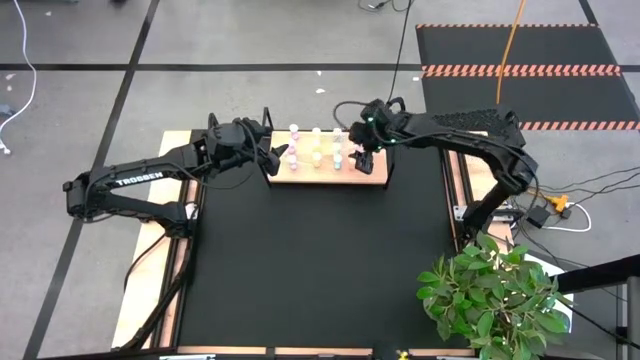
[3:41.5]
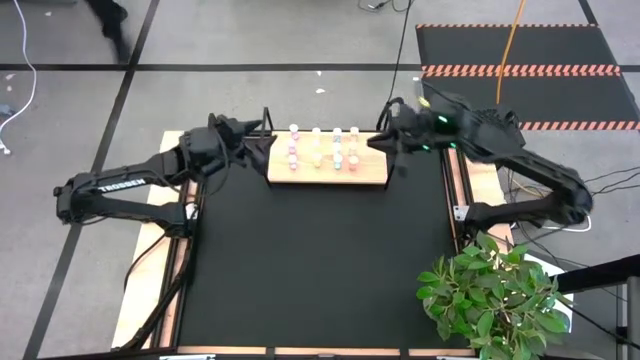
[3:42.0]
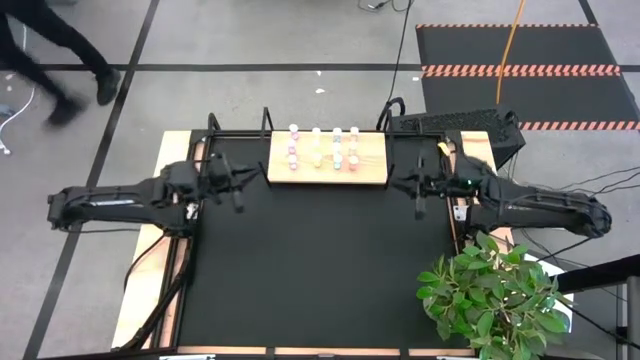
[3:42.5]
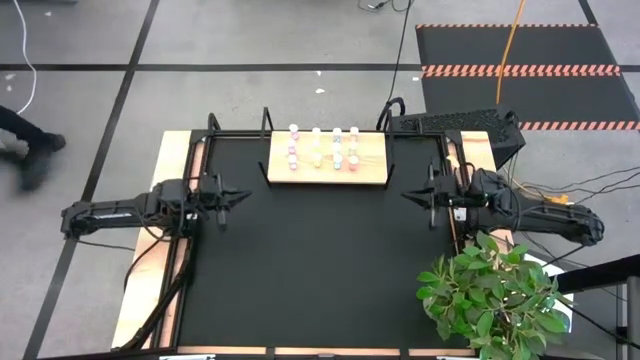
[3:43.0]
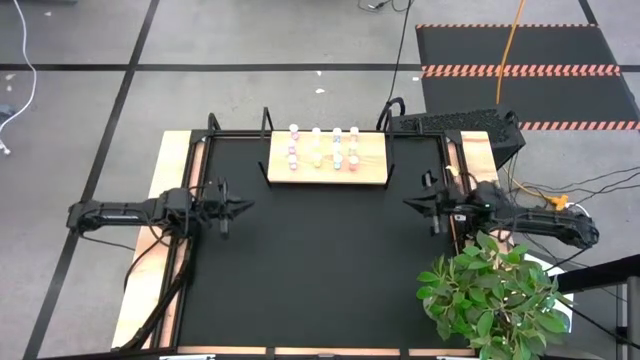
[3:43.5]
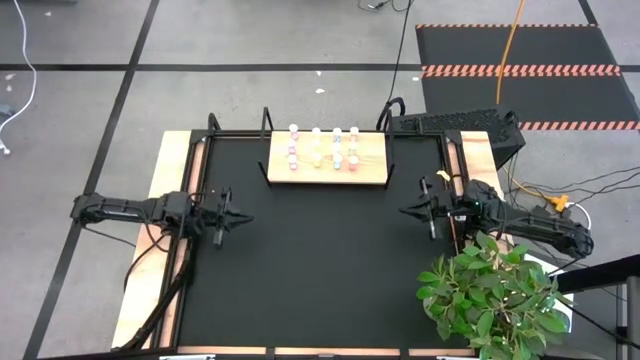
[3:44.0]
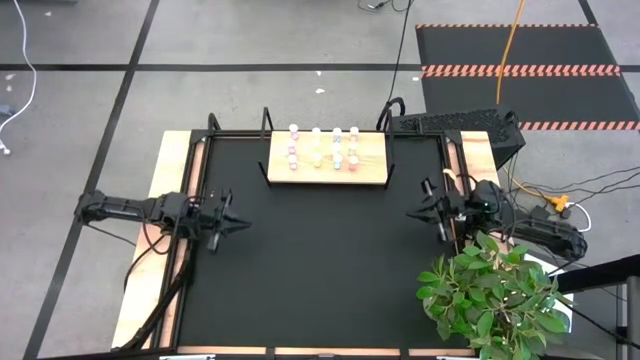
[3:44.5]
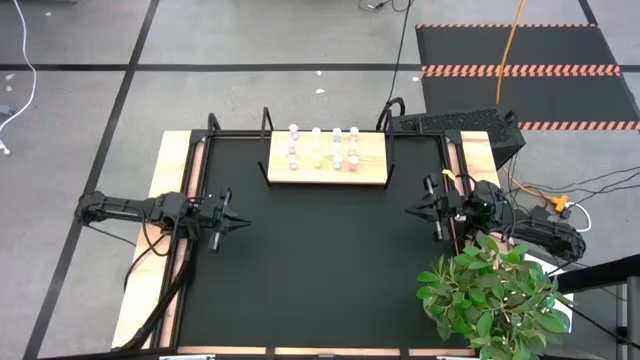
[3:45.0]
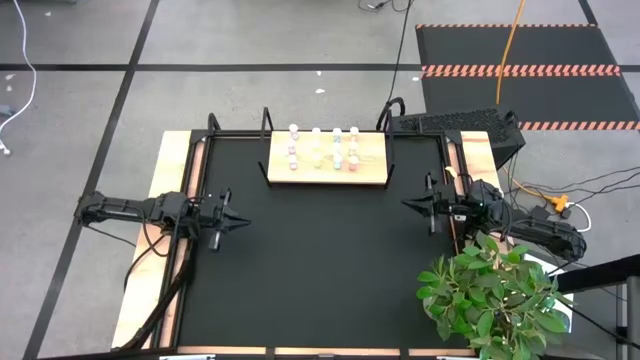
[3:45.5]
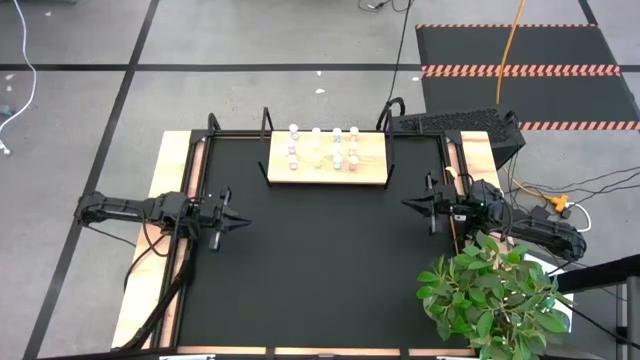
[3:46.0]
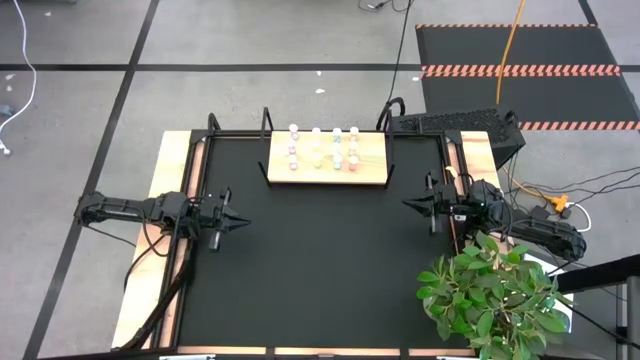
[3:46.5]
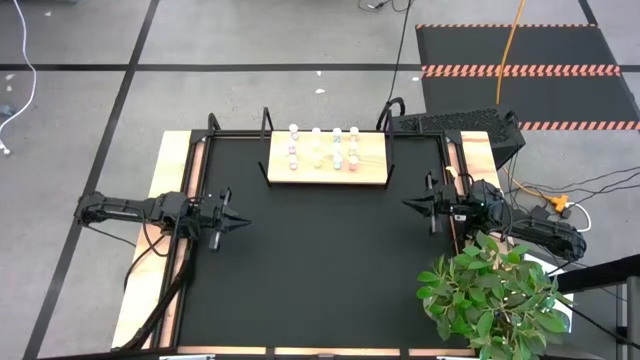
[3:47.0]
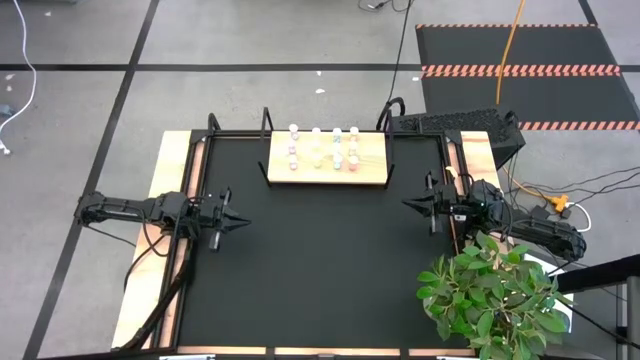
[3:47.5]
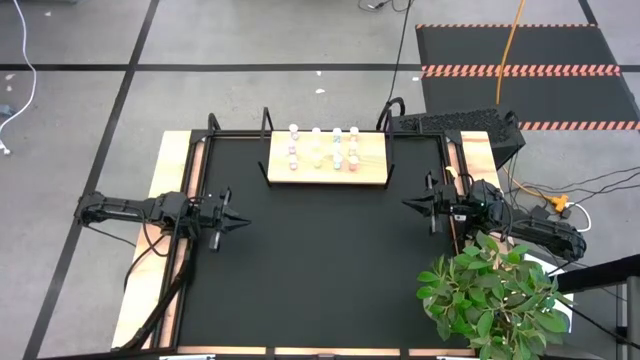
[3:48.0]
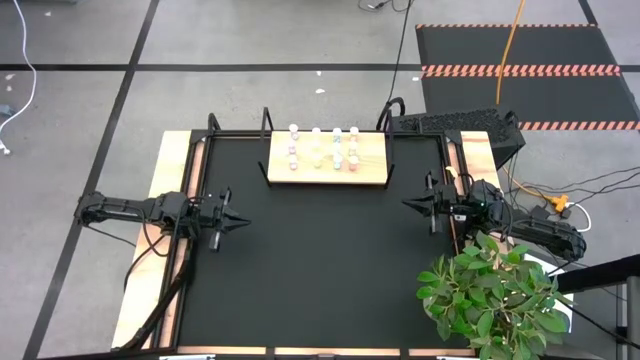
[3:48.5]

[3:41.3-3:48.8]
Task: Pick and place medicine bottles onto shelf by color
Return to Home Position

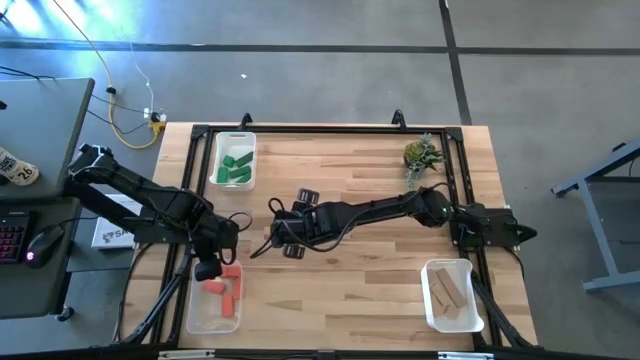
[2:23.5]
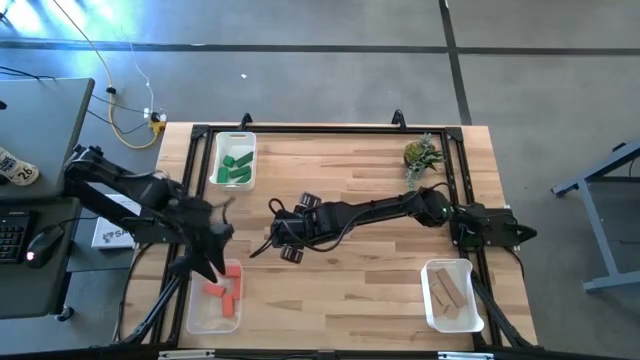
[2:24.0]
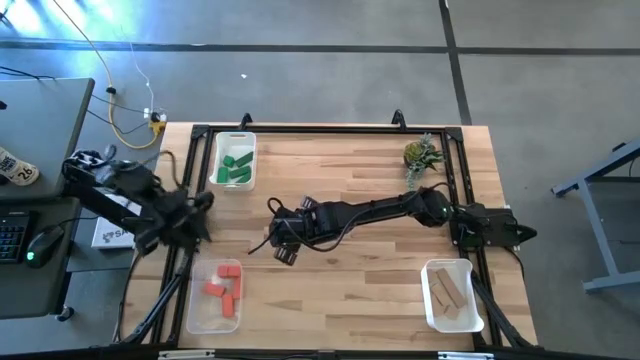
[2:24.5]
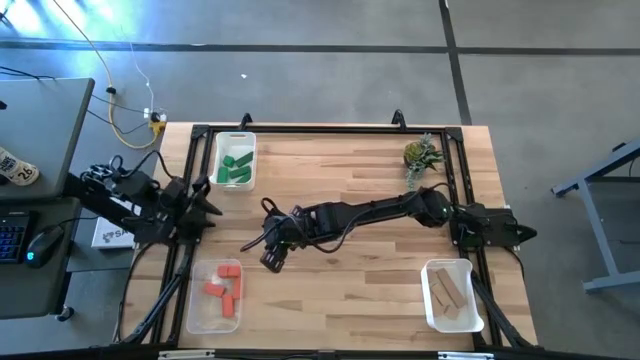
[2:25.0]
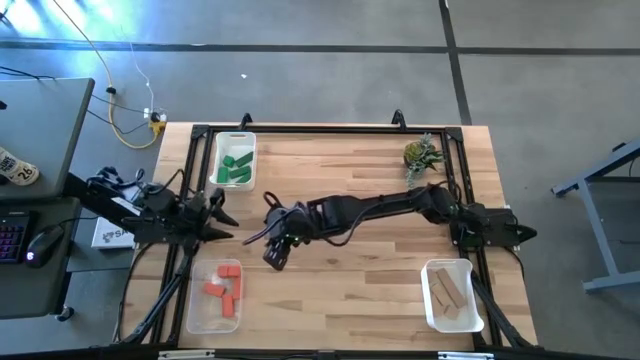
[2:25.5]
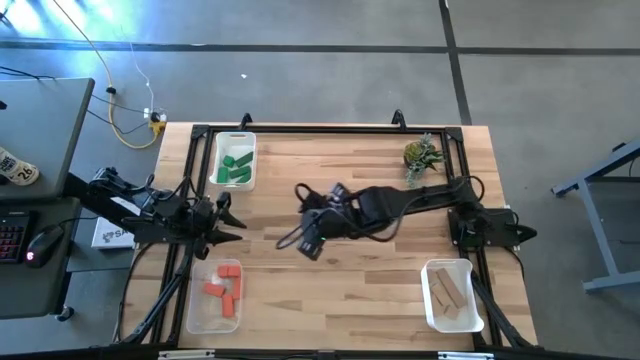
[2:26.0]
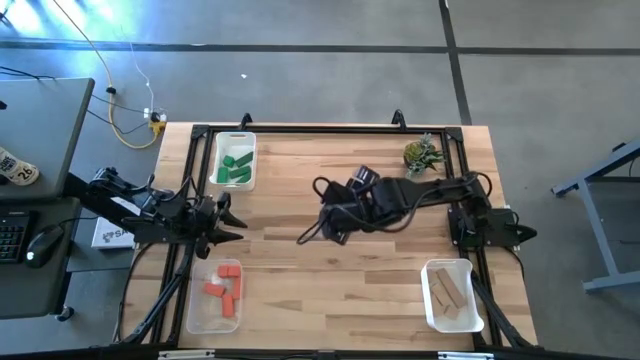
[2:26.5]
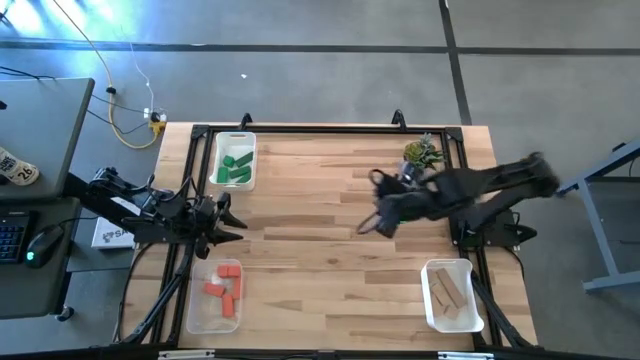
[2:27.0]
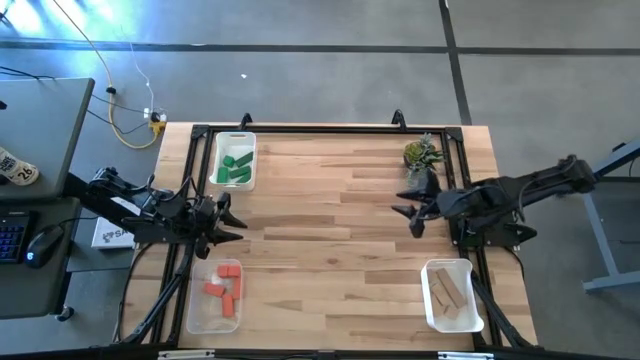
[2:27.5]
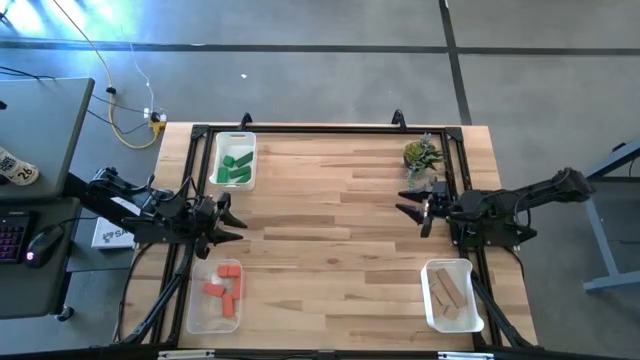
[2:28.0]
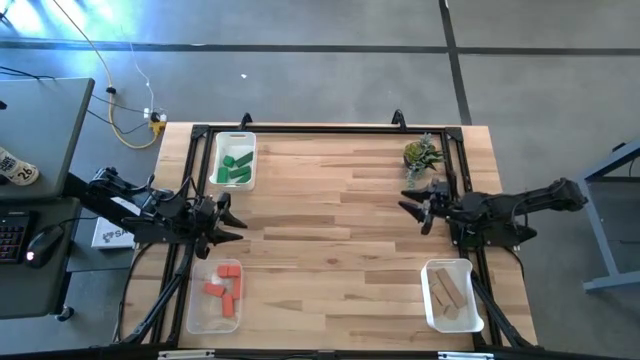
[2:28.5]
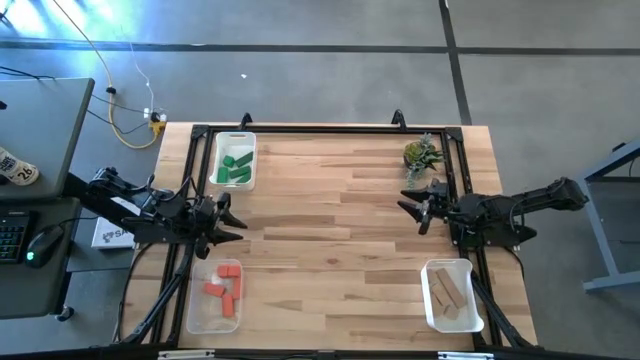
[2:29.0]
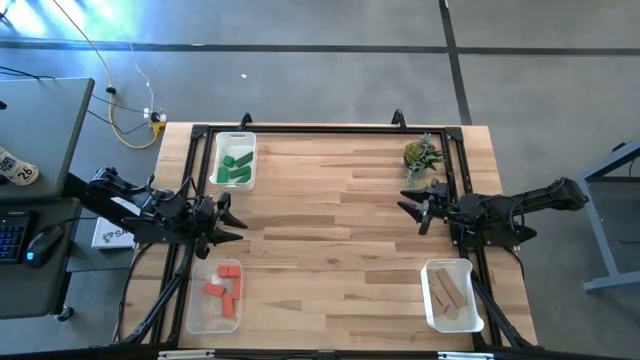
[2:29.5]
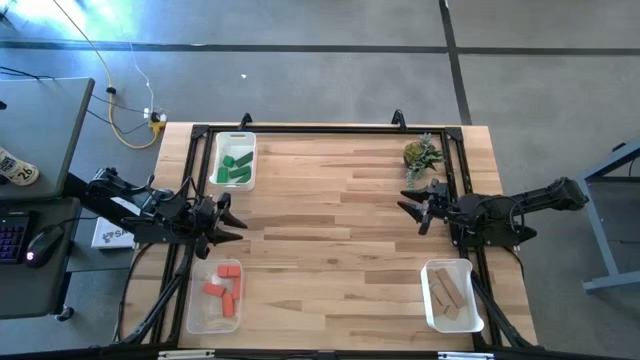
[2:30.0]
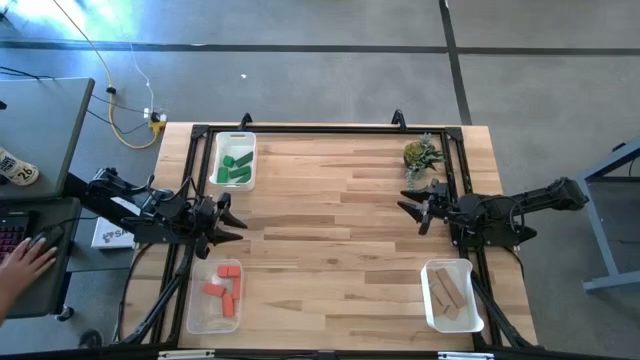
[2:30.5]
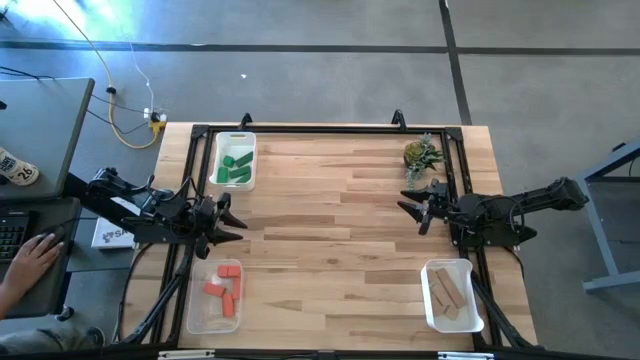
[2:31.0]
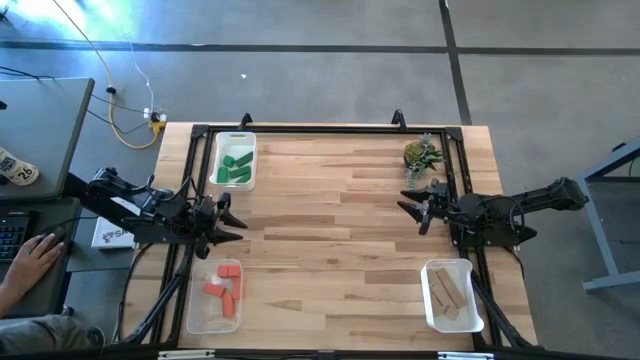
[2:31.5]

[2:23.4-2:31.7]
Task: Sort & place blocks by color
Return to Home Position
